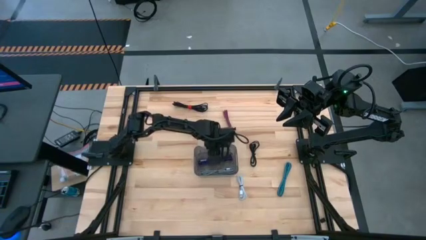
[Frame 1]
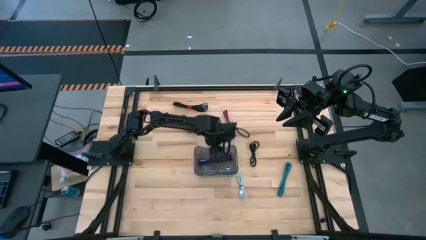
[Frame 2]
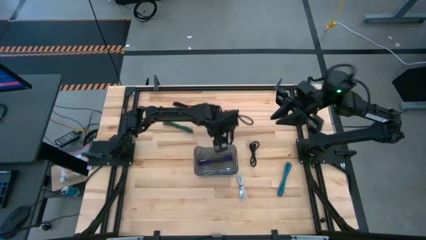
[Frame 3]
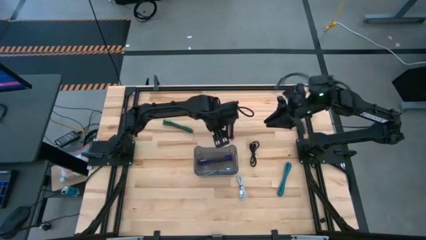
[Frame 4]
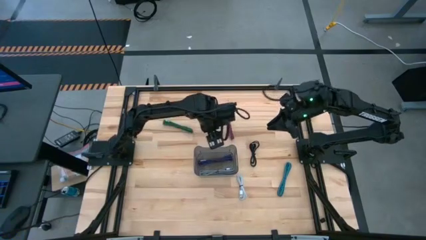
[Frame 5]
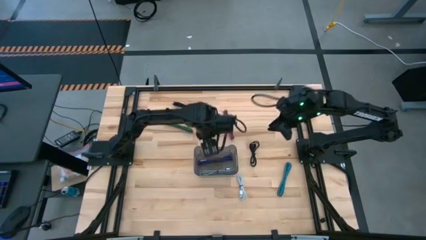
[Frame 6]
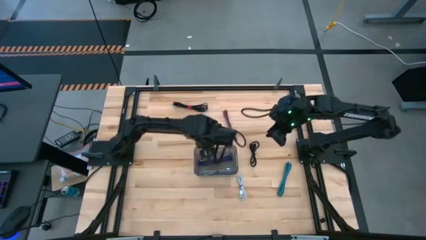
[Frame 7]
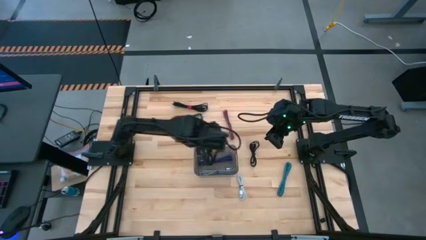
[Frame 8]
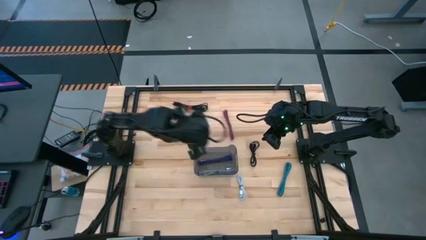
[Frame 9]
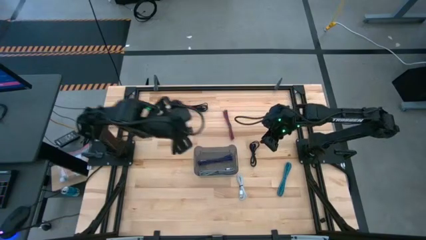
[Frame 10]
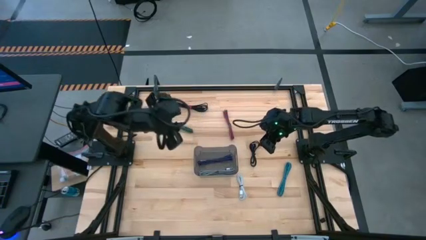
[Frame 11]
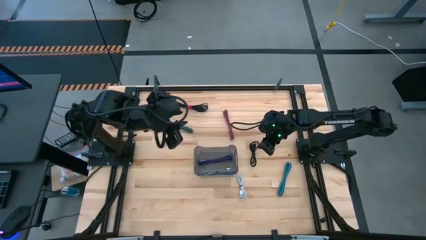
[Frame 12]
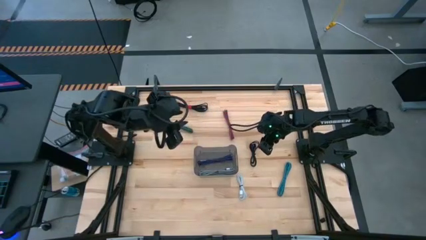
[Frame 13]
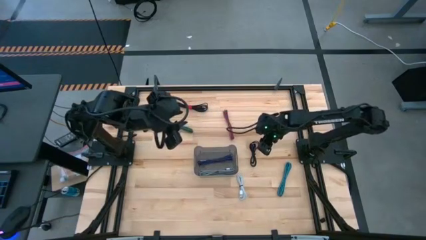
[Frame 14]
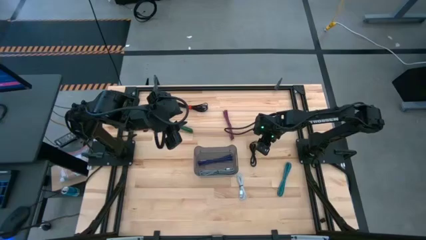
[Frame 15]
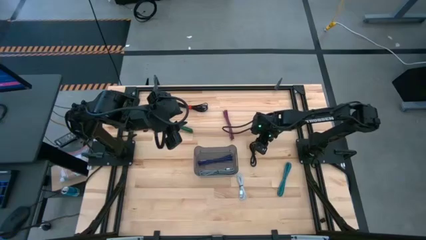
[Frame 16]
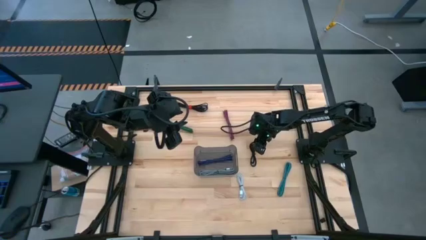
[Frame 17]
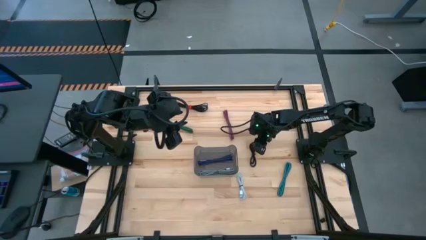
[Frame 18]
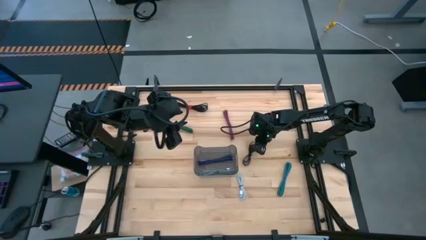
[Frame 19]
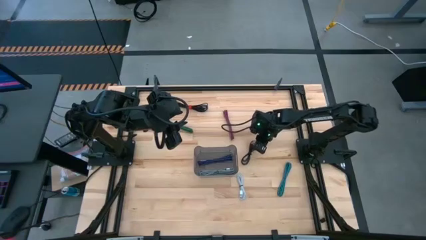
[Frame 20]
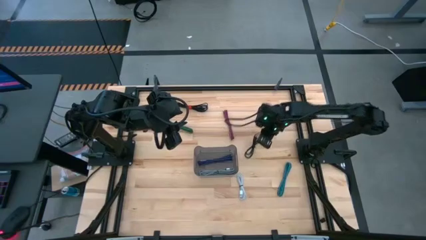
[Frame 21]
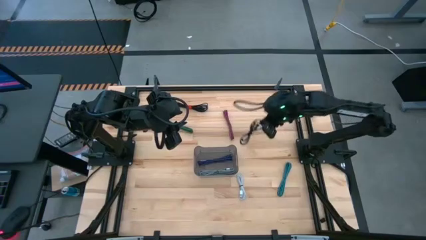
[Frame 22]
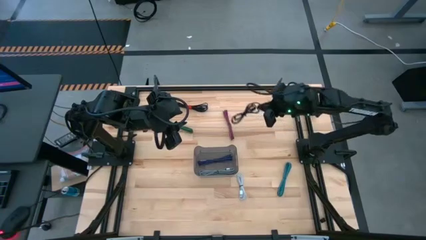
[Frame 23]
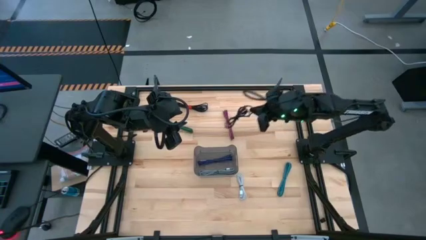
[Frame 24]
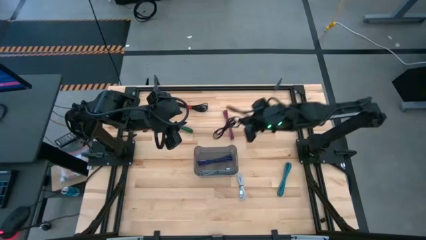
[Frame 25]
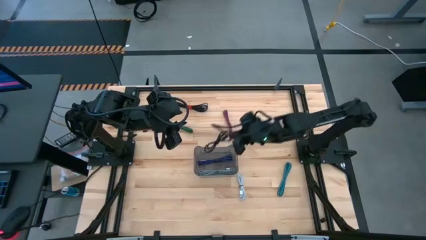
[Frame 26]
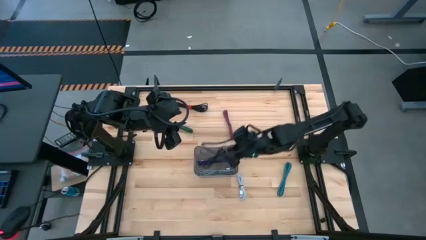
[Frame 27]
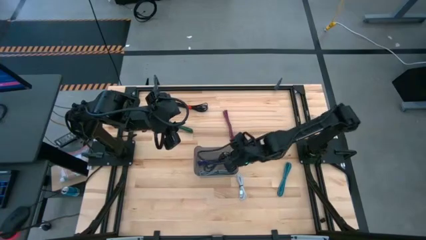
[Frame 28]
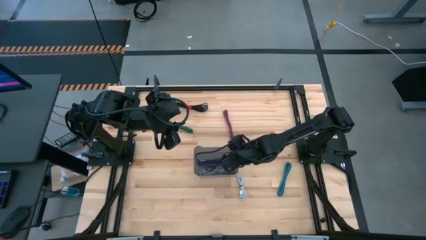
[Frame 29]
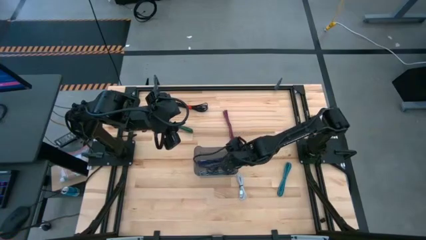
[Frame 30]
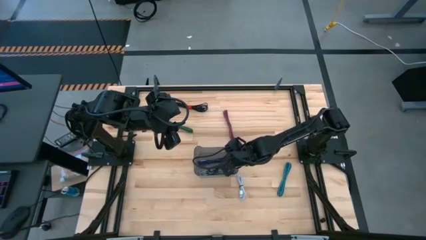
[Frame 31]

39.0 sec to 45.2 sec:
Task: Pick and place USB-C Cables
Put the bottom black charger cable into the black bin

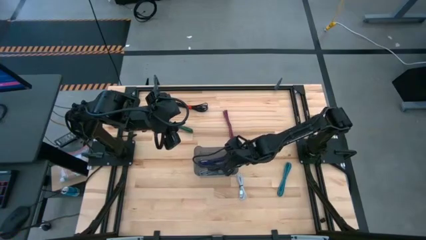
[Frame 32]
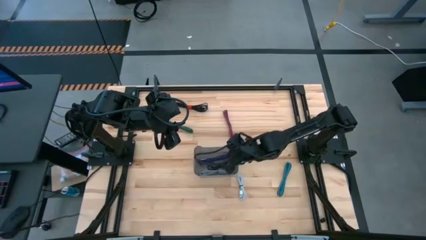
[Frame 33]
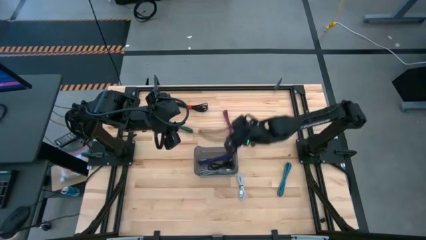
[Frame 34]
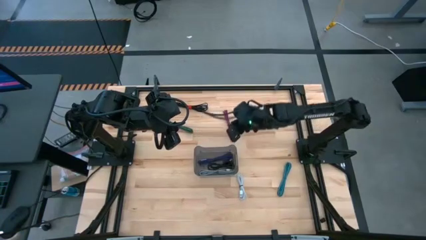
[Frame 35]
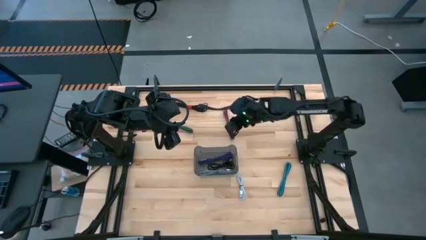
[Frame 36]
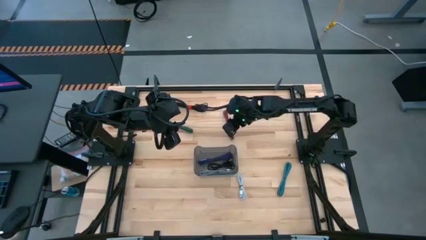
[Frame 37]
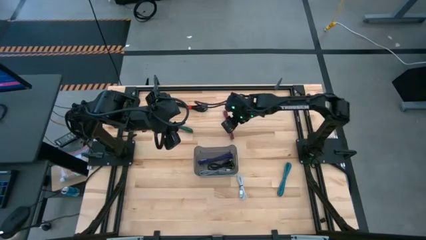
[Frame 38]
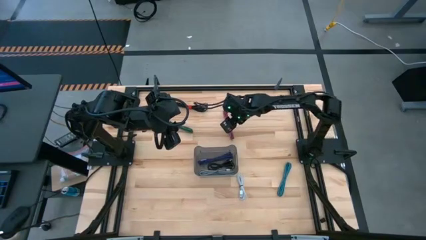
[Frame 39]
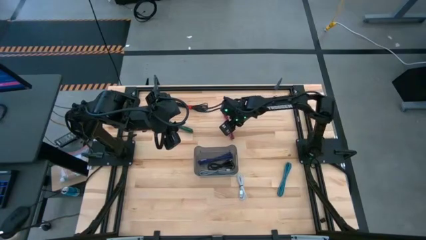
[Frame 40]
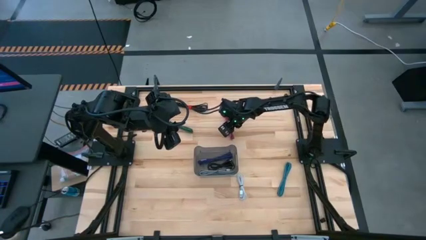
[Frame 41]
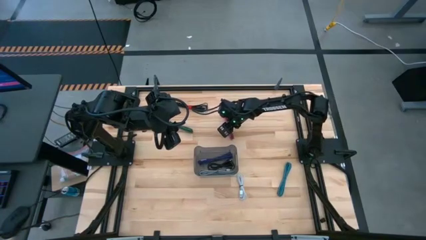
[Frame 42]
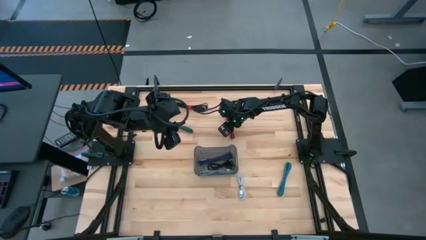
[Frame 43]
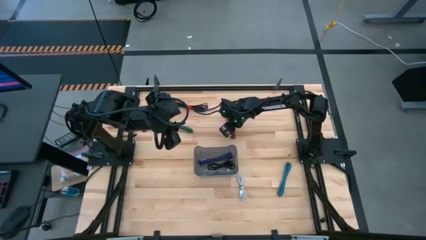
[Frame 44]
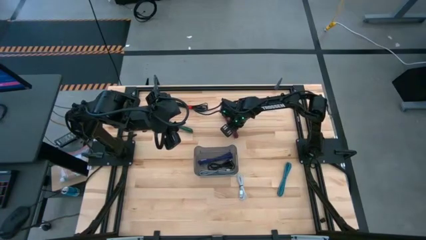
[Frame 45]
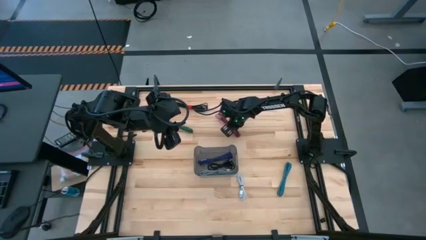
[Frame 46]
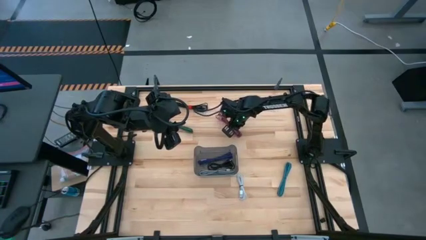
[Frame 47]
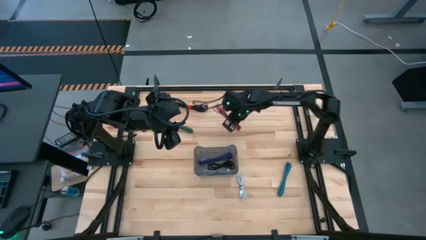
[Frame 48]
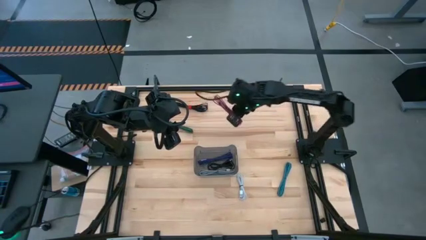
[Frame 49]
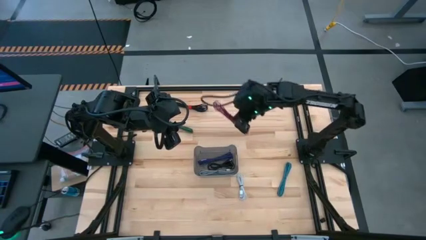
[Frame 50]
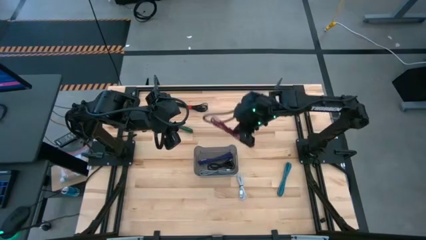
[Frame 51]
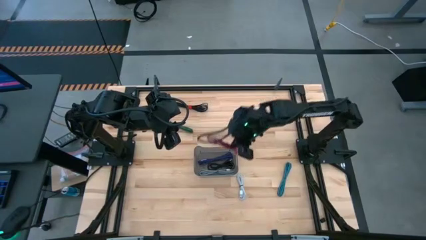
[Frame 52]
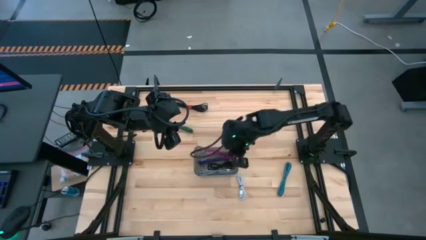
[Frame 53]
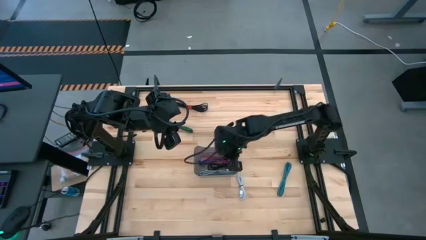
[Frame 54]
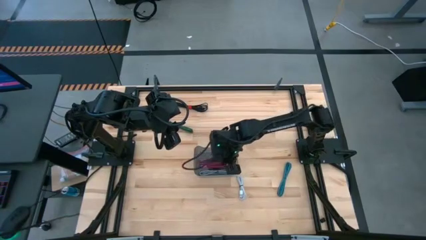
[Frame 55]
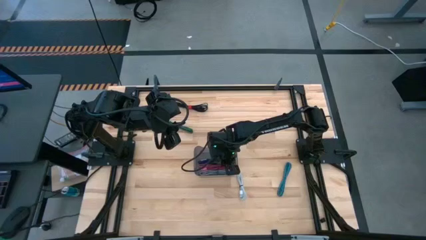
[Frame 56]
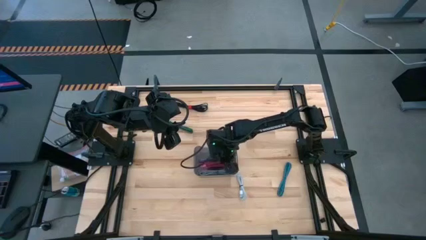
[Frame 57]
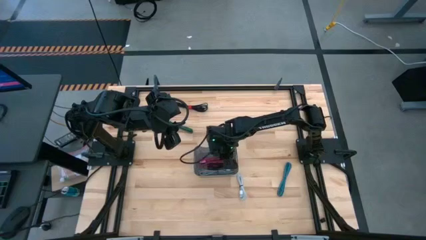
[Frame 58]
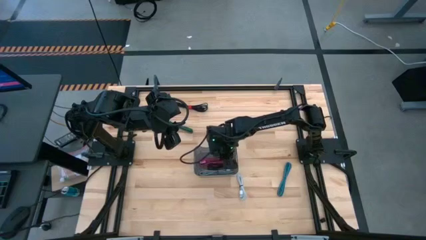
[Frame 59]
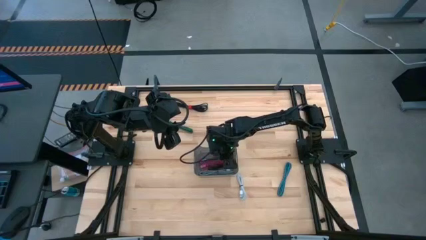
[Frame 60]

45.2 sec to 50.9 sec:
Put the pink charger cable into the black bin

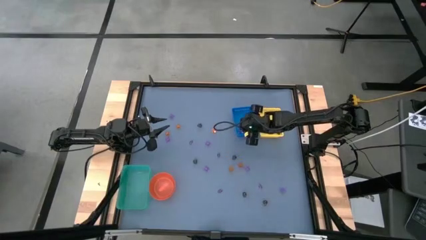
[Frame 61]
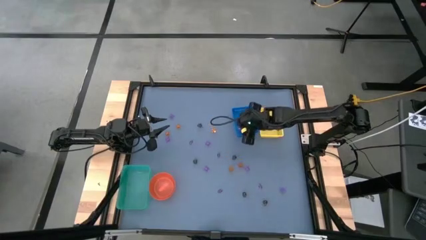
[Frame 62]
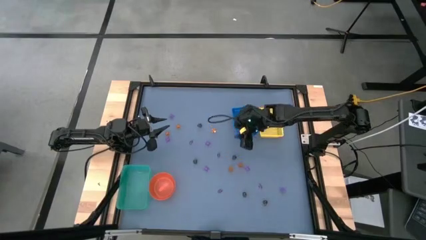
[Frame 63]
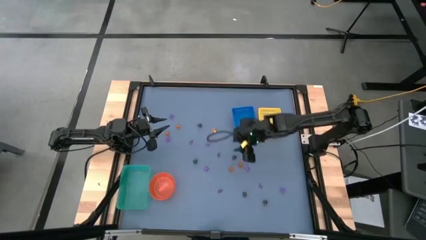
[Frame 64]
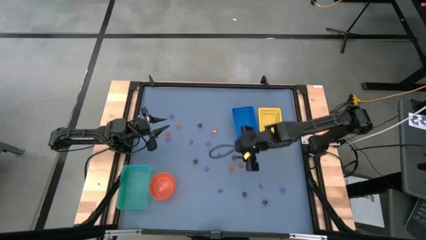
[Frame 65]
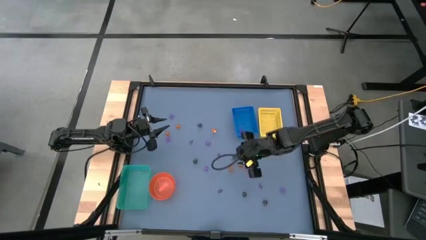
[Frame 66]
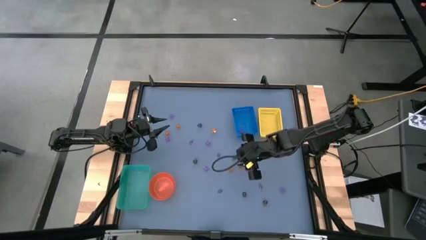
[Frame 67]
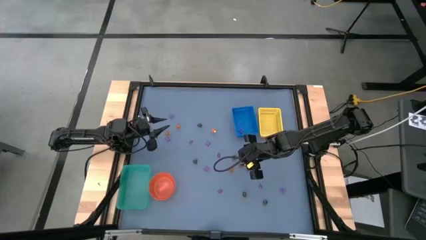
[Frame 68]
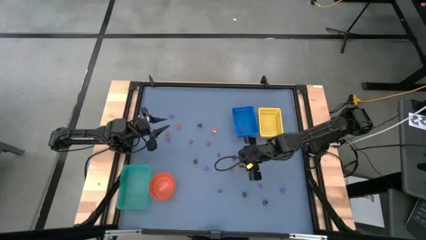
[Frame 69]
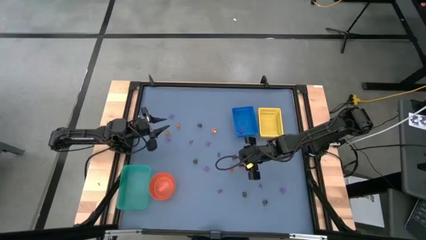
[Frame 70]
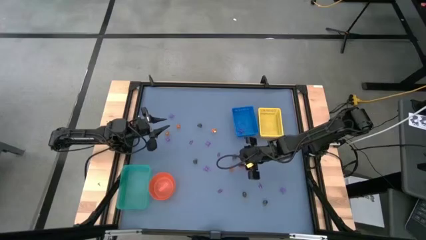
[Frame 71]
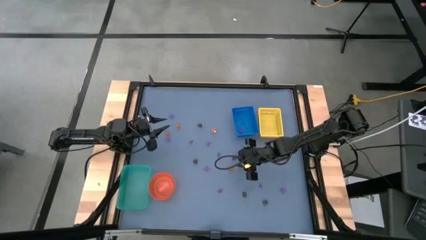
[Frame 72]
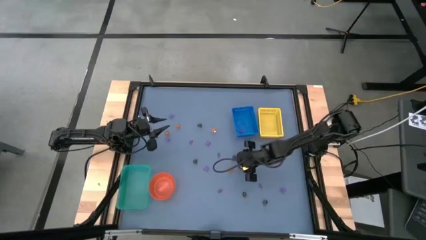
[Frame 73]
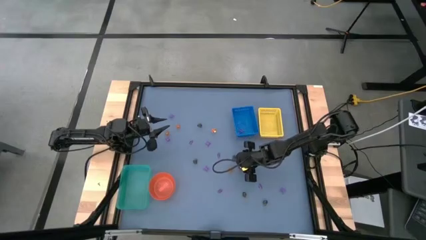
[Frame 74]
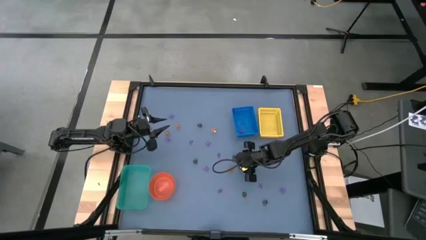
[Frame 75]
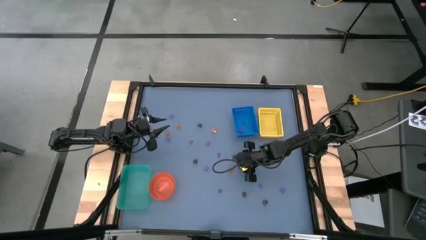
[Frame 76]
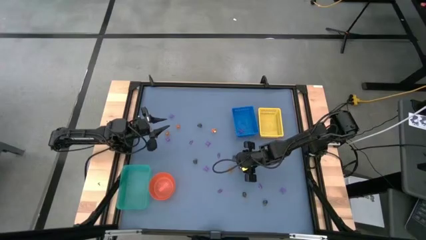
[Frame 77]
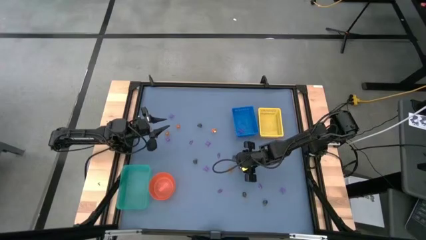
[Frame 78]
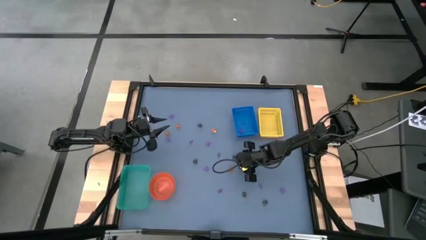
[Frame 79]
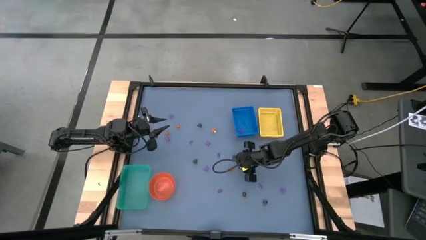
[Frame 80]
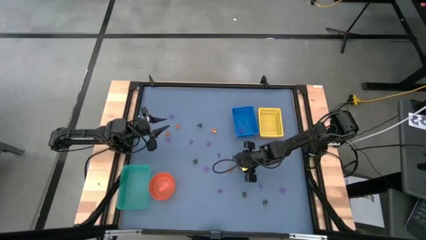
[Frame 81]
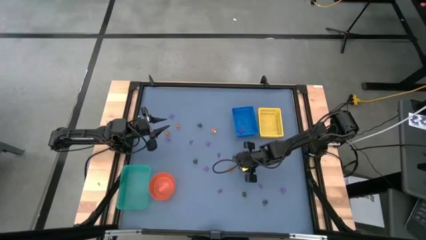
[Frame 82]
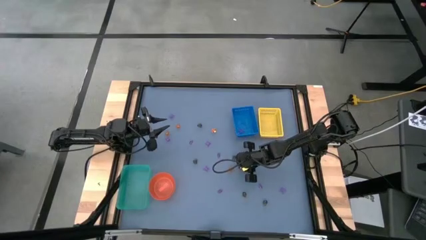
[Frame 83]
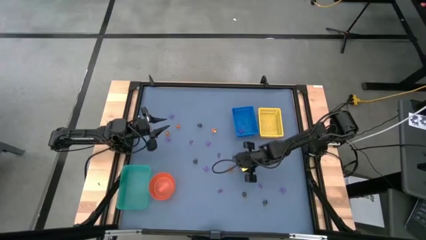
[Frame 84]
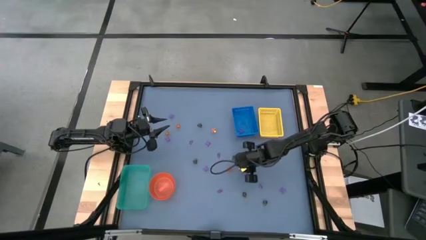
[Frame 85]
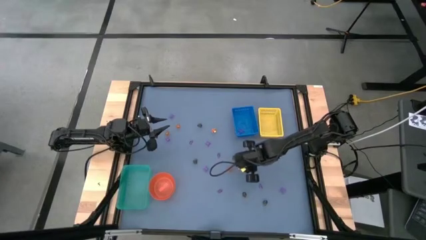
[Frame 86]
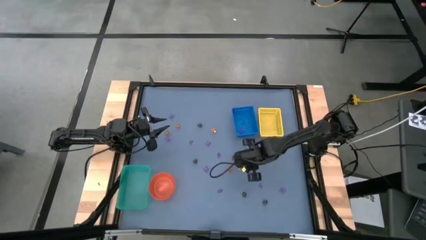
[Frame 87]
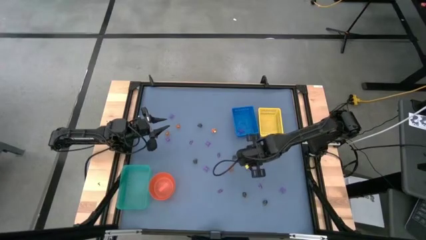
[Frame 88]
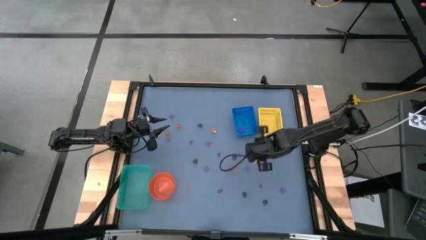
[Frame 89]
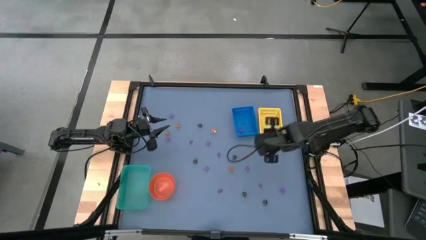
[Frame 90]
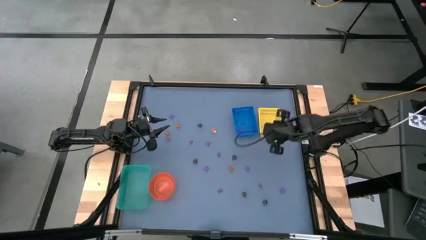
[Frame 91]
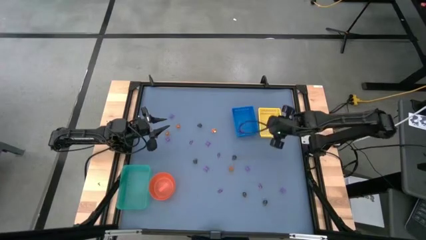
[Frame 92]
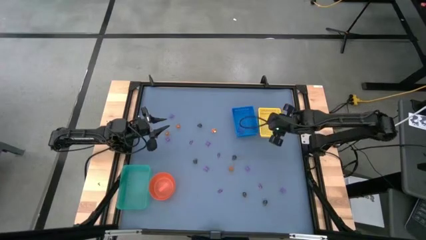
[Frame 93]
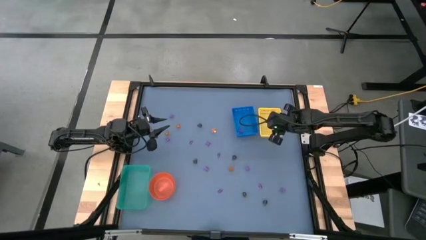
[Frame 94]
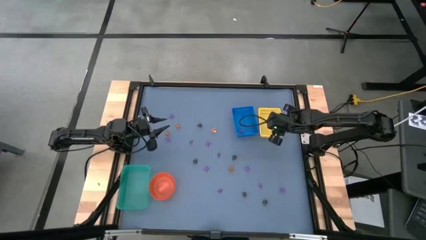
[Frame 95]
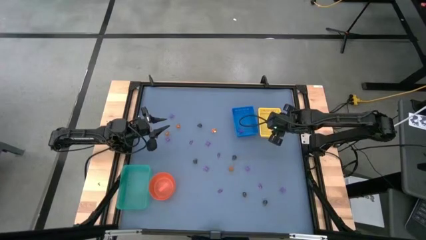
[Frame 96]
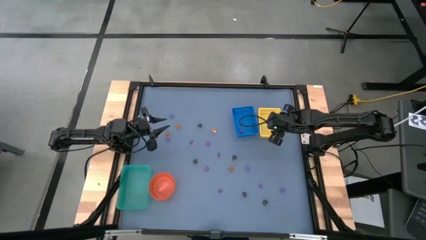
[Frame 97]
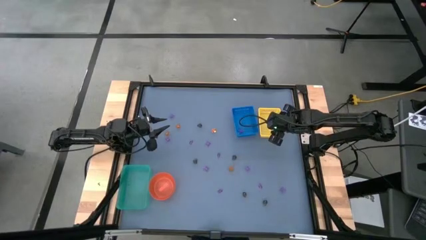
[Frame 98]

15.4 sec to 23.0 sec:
Task: Sort Halloween decoration
Put the orange pumpkin toy into the yellow box
